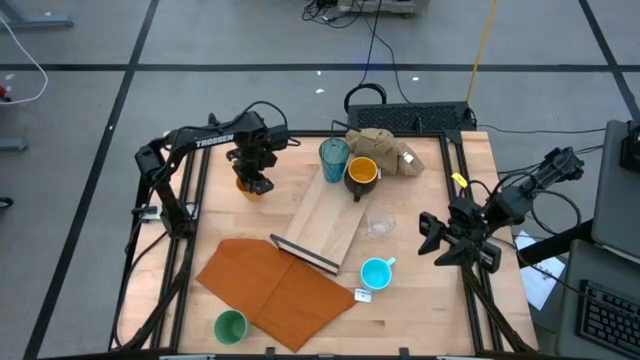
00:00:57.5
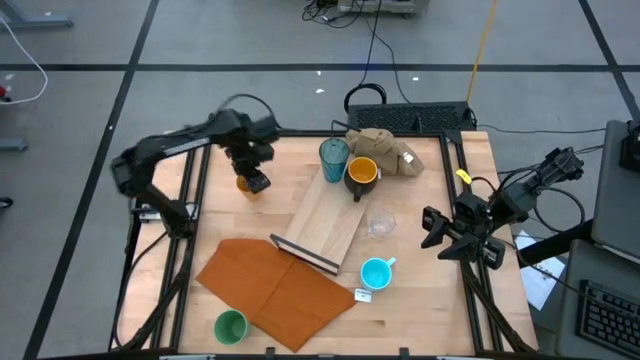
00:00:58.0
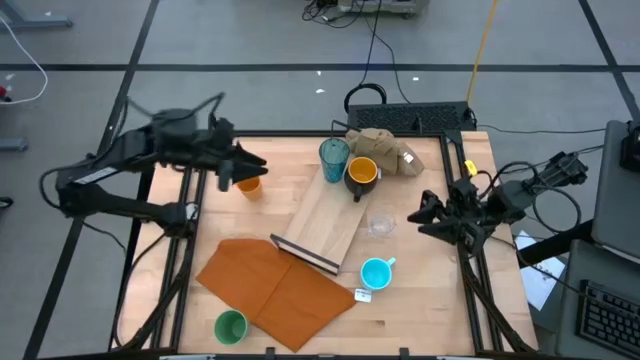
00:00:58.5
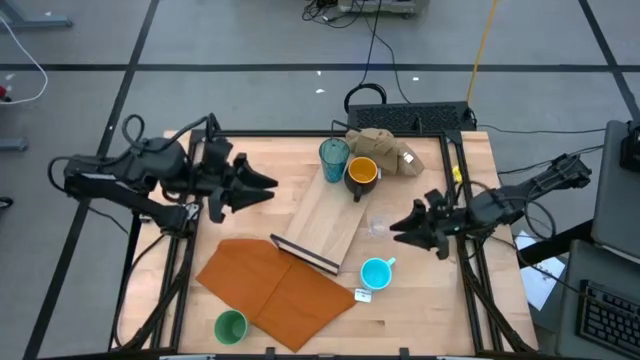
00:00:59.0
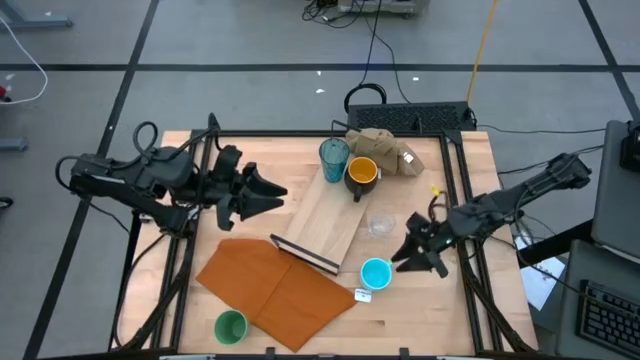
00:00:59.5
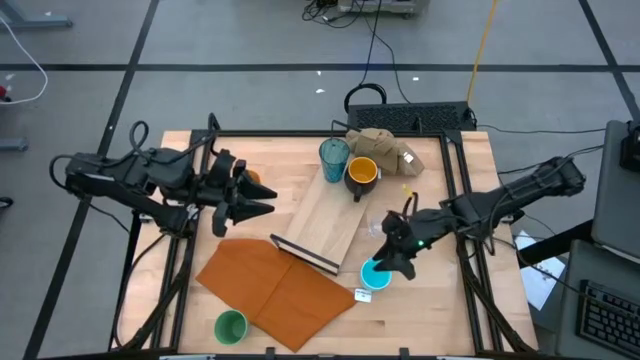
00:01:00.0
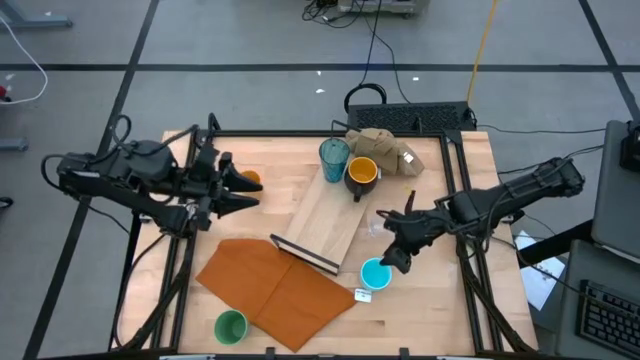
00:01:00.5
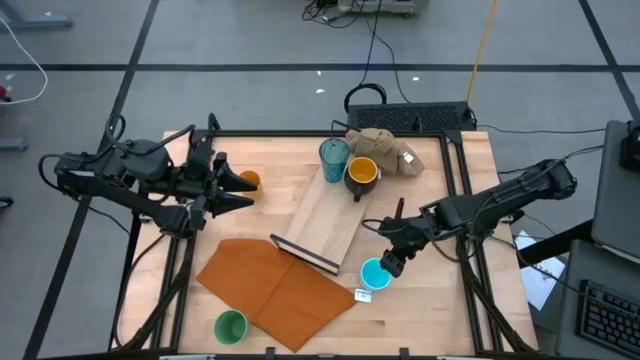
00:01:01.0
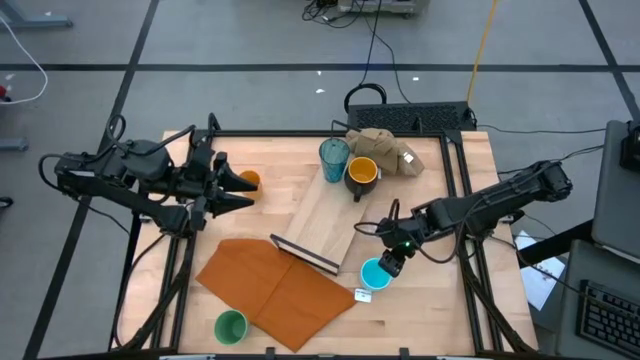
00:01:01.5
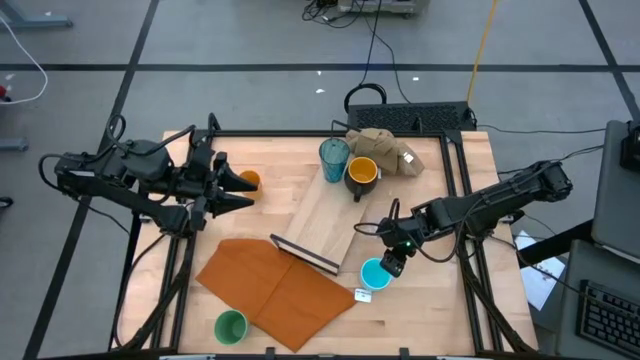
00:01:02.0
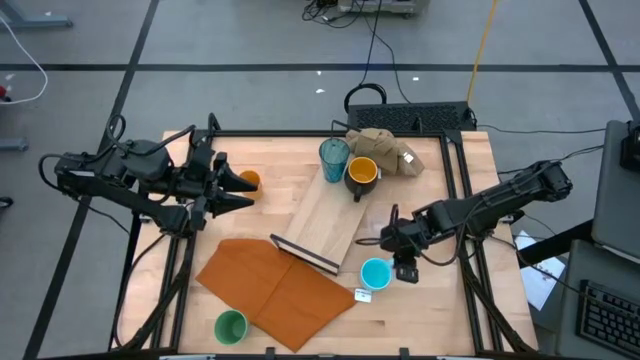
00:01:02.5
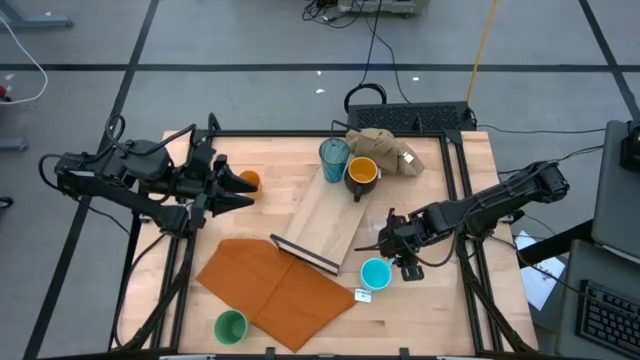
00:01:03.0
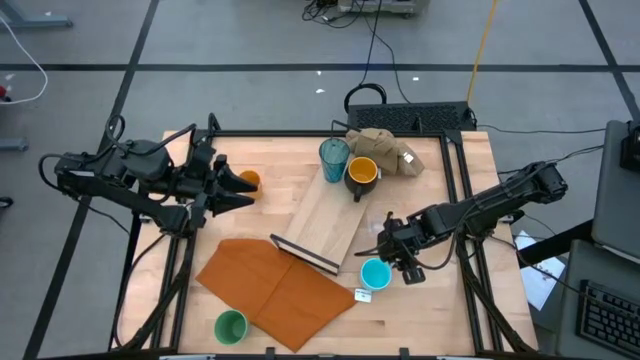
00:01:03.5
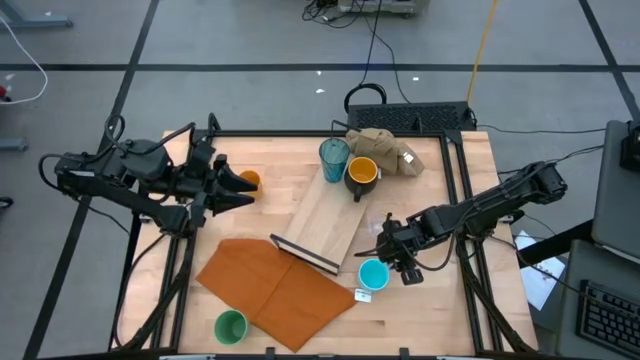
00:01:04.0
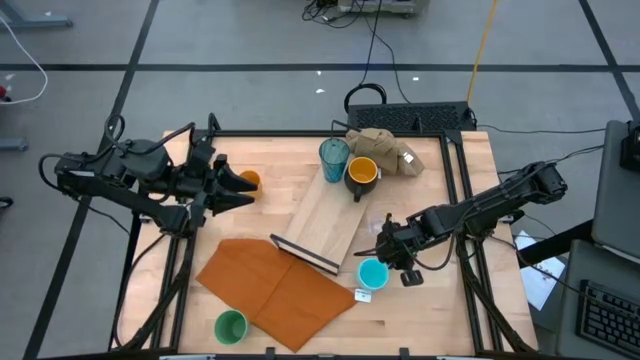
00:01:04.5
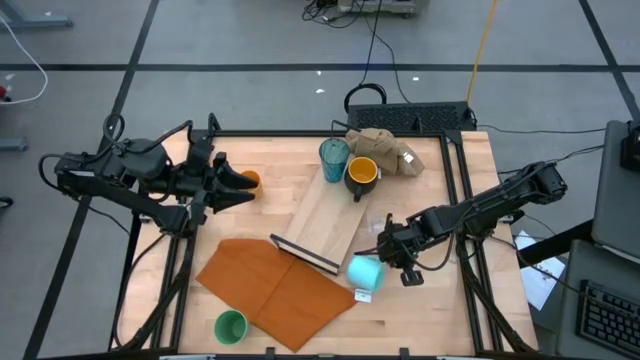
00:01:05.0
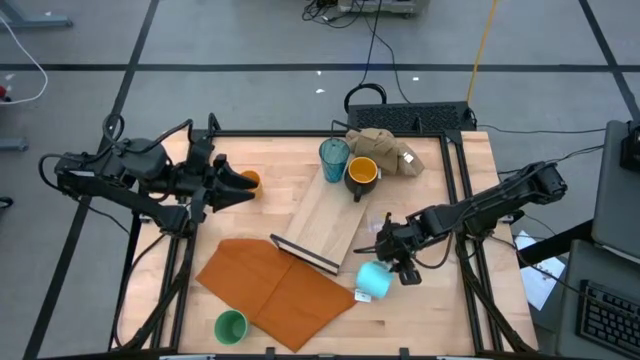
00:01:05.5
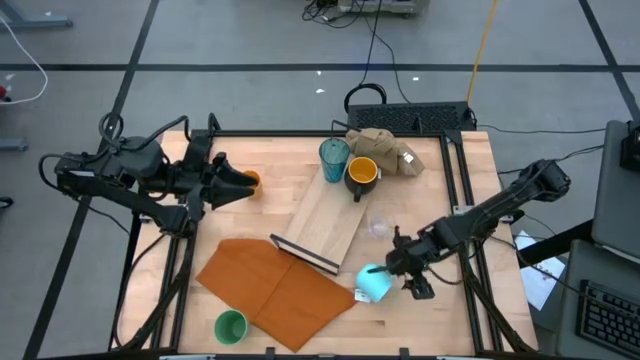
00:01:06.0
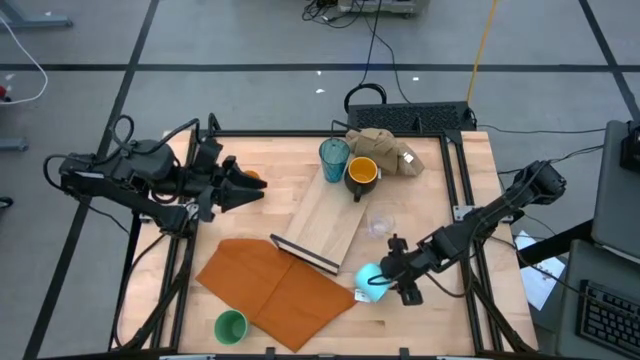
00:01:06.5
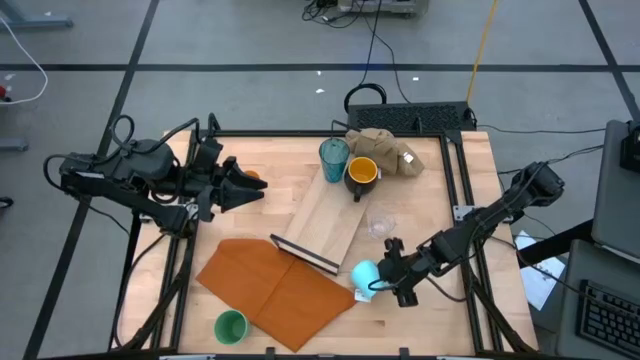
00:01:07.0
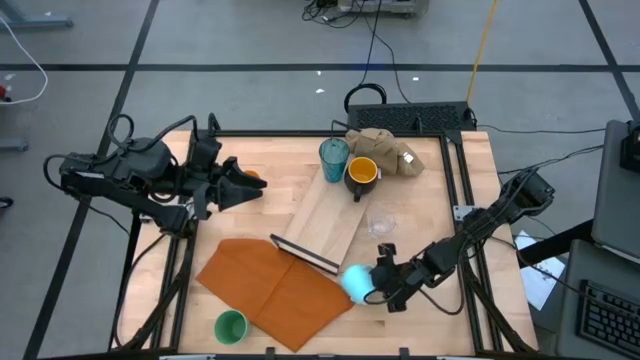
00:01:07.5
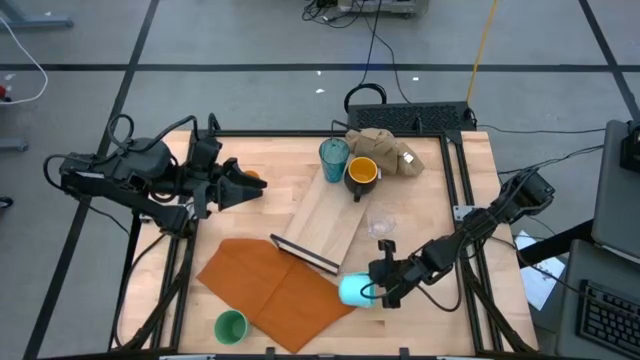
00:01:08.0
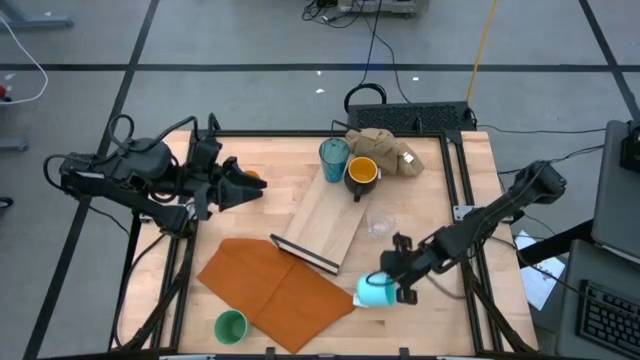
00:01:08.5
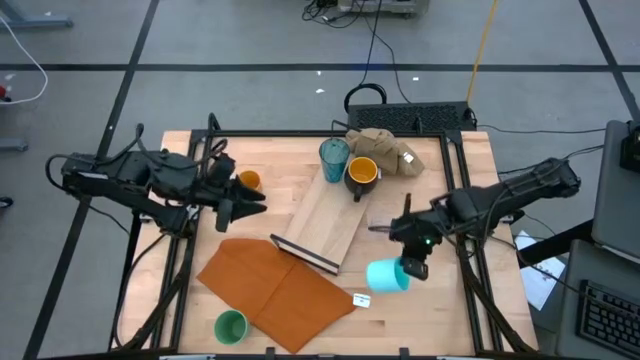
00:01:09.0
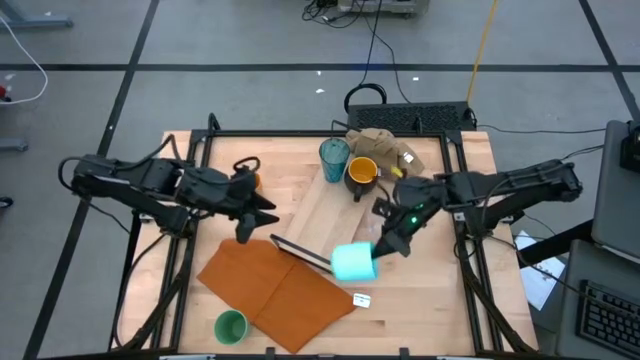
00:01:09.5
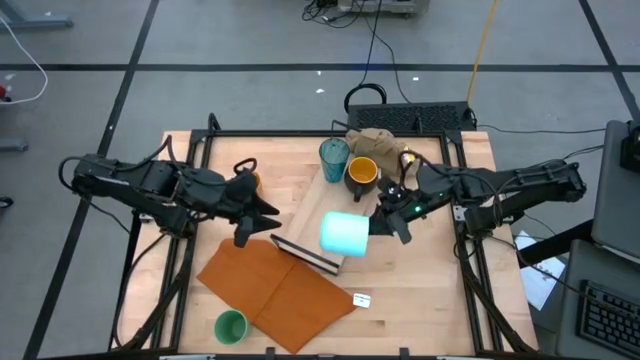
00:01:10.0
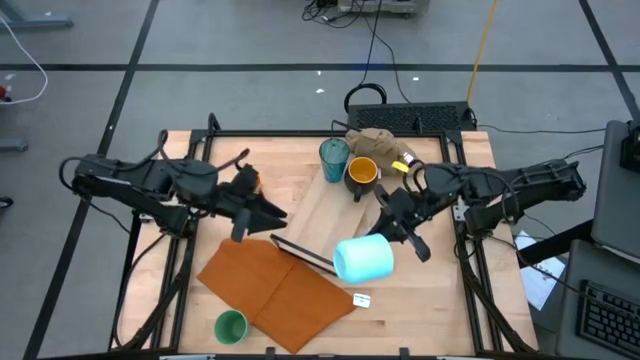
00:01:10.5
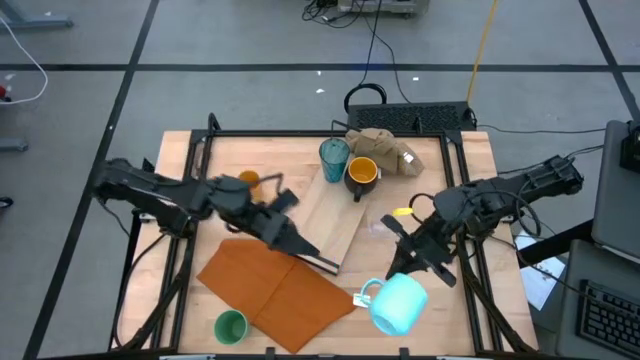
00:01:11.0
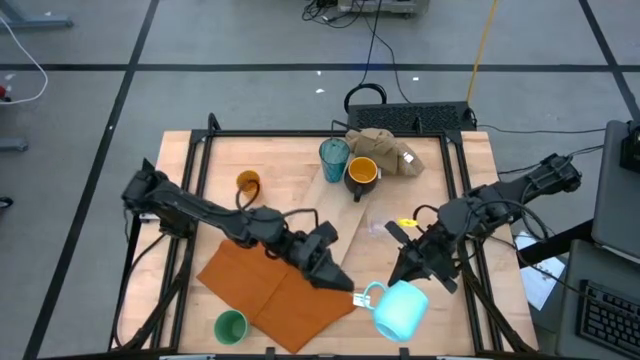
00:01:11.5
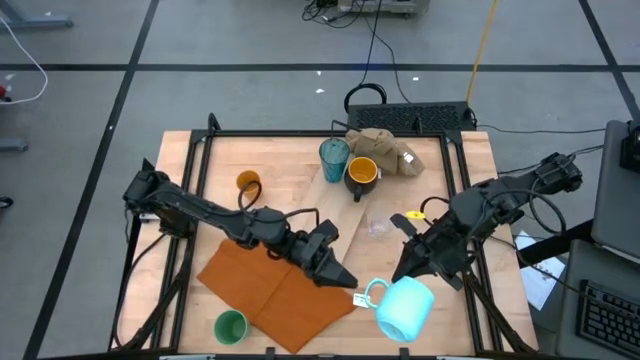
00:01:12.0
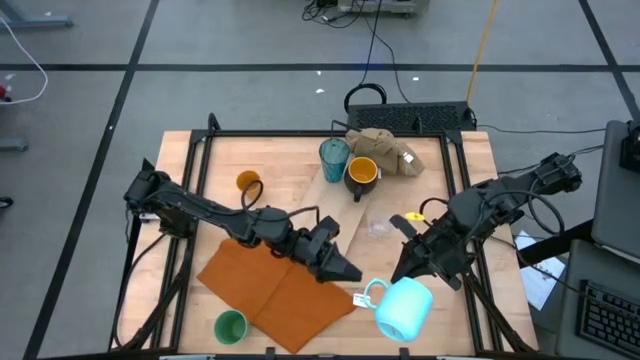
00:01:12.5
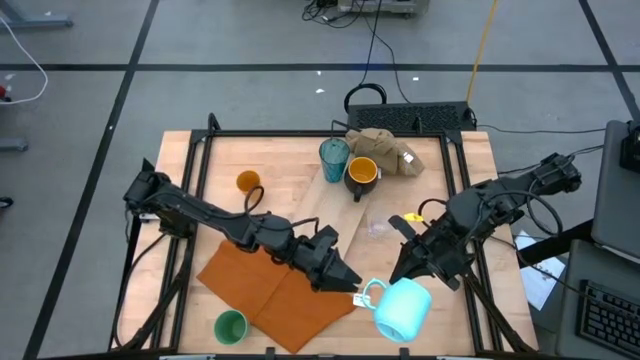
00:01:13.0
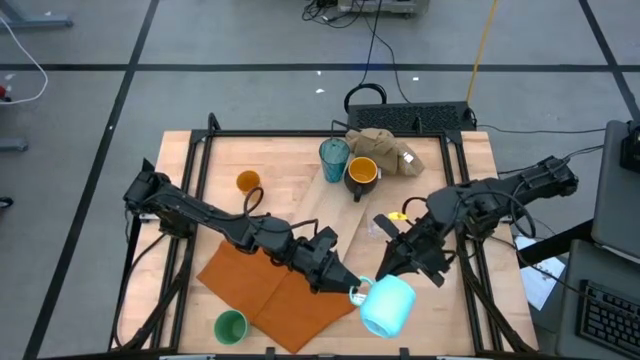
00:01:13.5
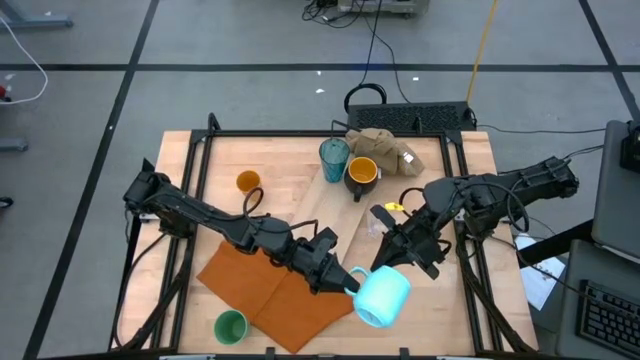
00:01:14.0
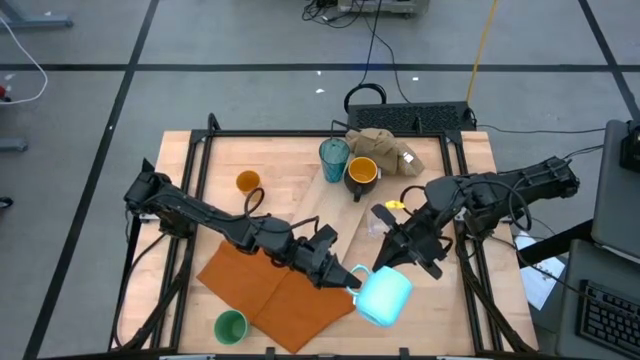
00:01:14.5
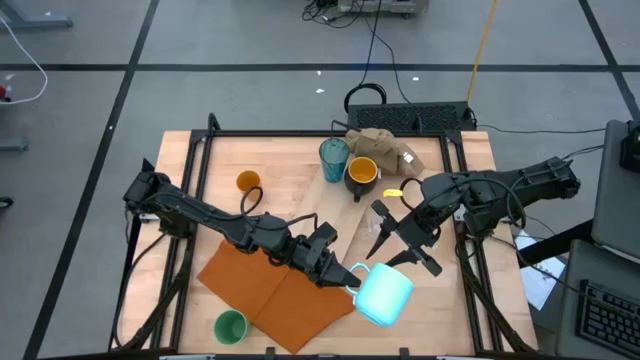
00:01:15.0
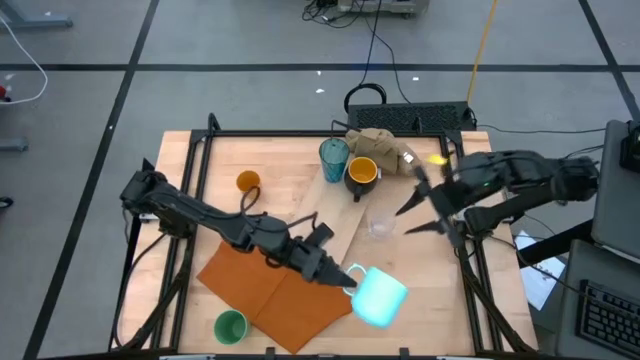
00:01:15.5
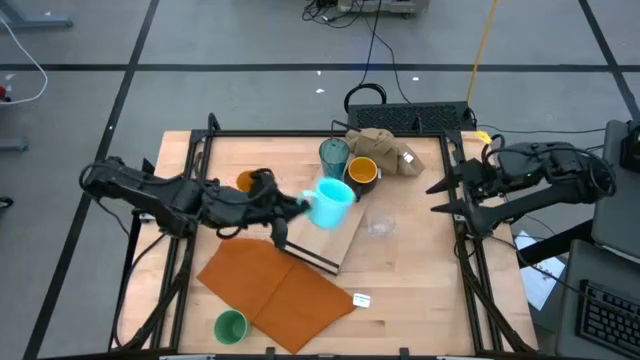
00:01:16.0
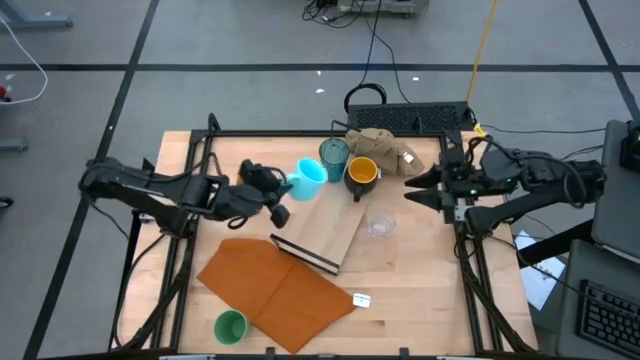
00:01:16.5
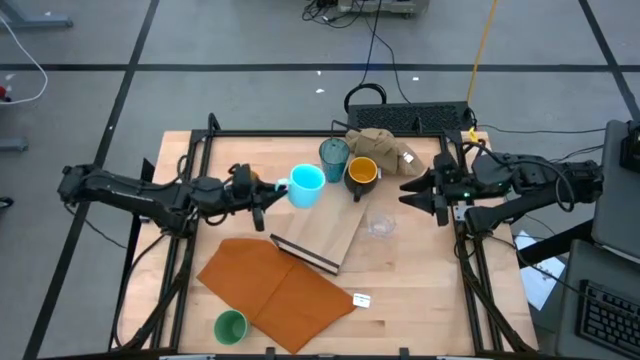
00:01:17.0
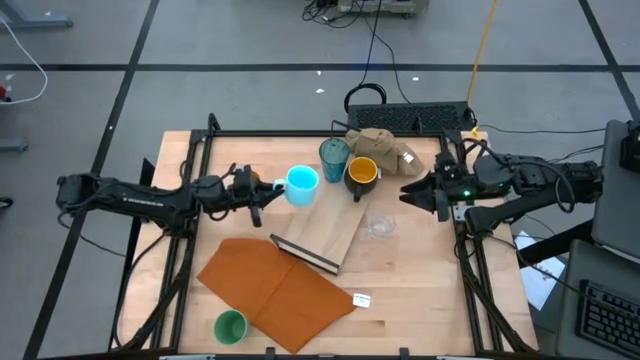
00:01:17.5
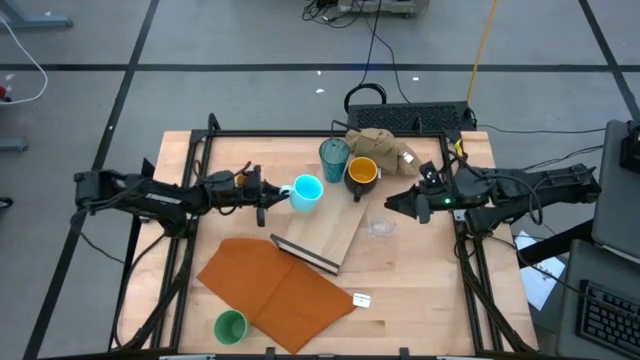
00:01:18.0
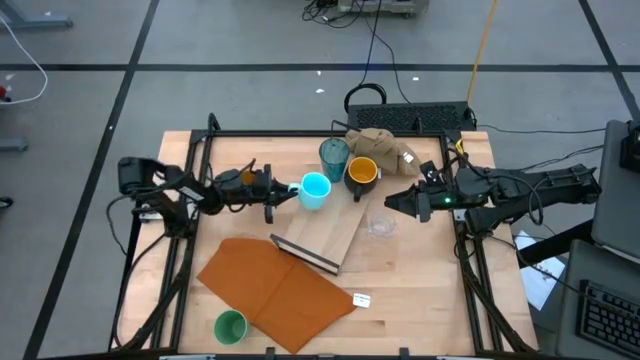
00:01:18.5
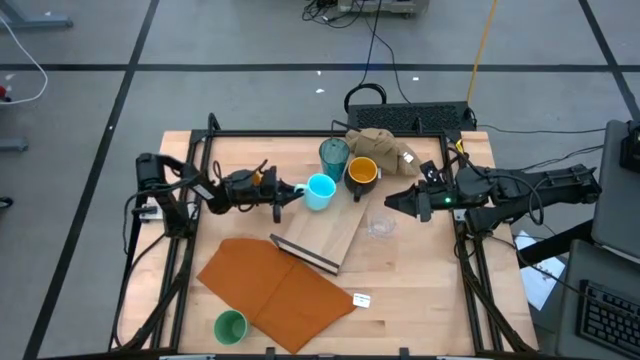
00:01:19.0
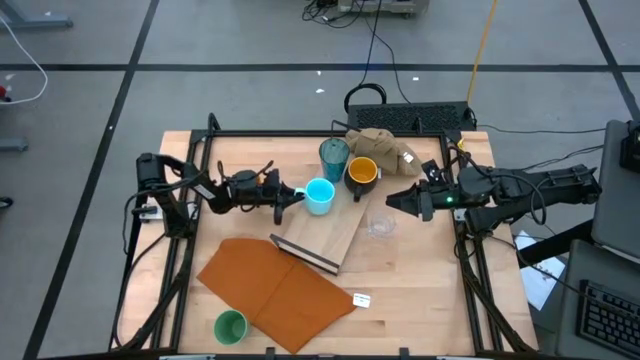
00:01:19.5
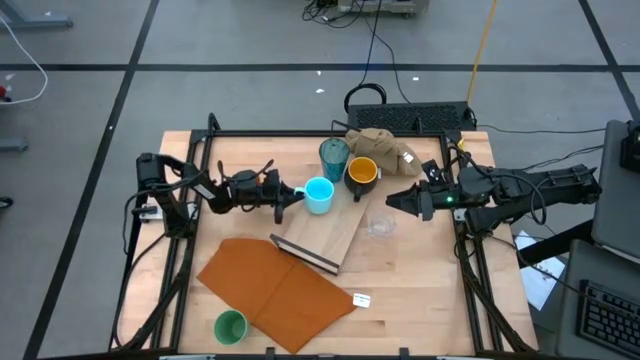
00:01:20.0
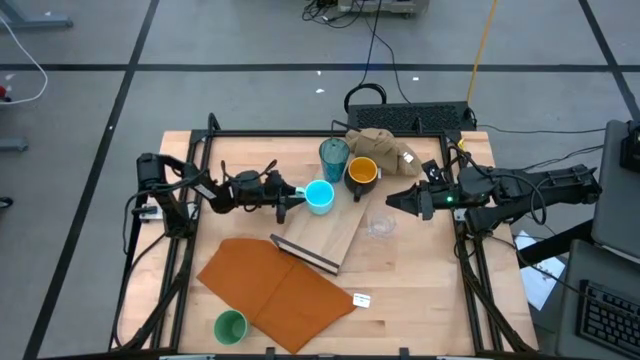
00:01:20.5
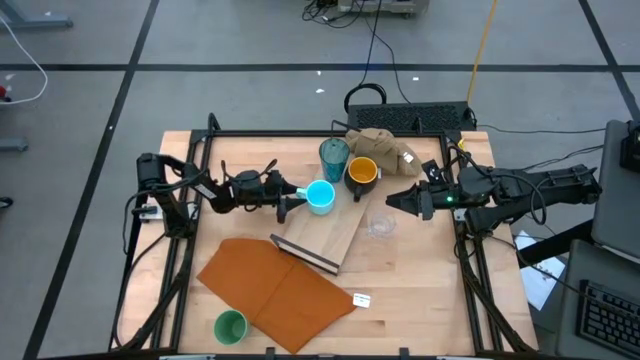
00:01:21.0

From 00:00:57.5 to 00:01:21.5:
Task: Stack small to large cups/mugs on shelf
Put the light blue mug on the shelf
